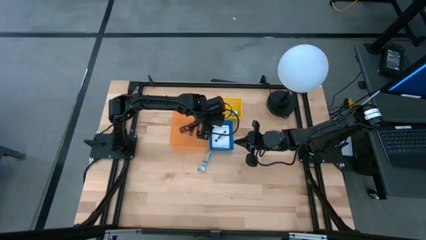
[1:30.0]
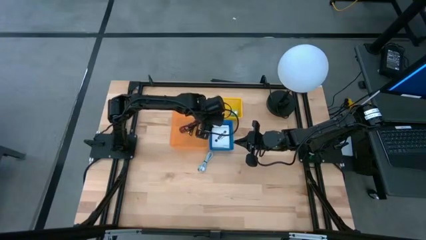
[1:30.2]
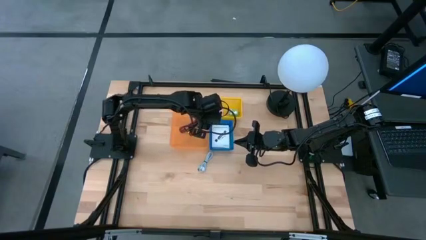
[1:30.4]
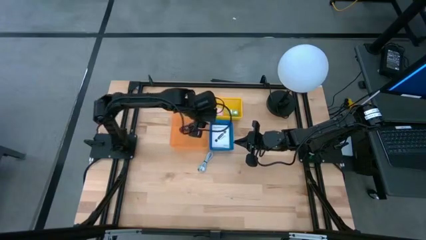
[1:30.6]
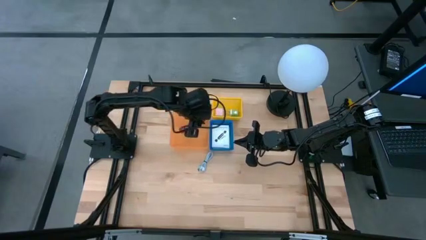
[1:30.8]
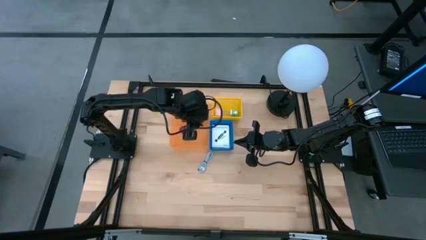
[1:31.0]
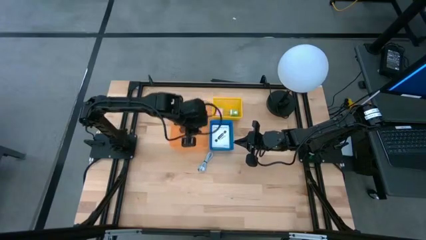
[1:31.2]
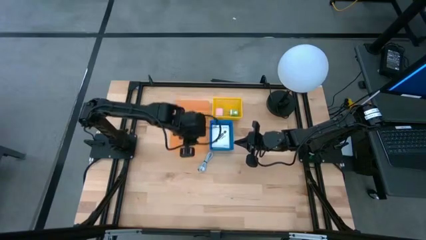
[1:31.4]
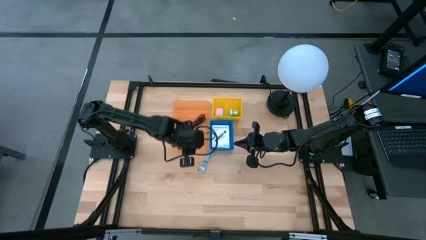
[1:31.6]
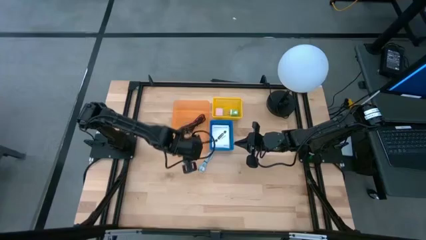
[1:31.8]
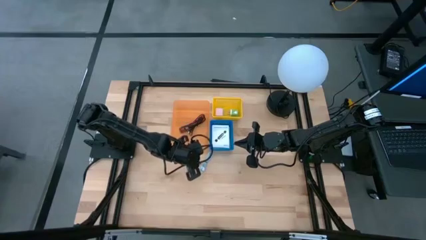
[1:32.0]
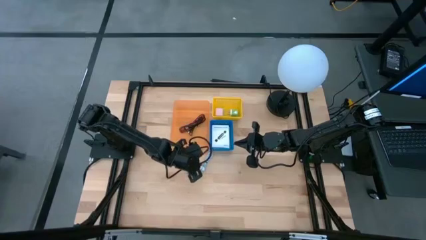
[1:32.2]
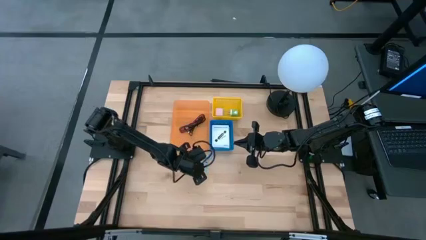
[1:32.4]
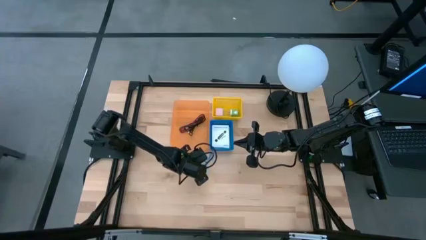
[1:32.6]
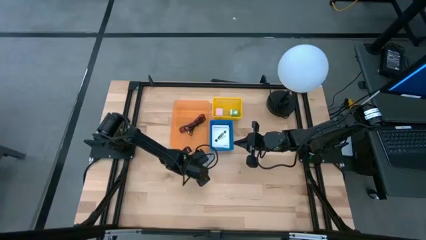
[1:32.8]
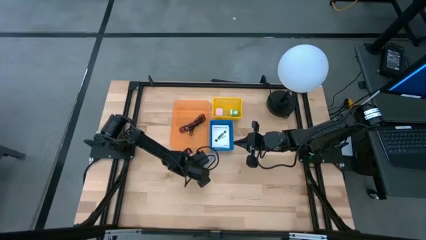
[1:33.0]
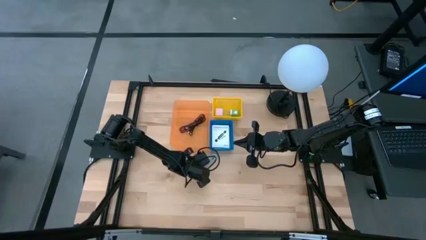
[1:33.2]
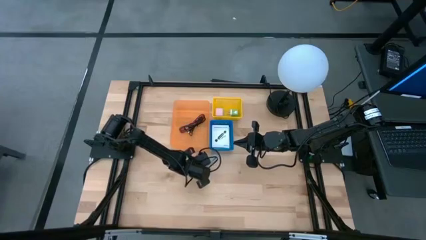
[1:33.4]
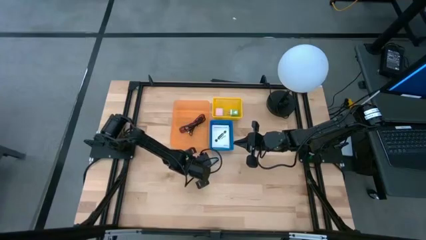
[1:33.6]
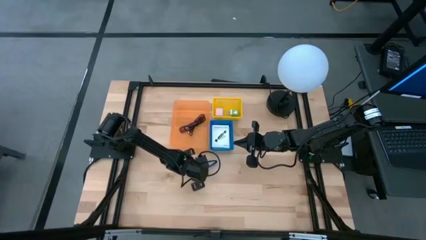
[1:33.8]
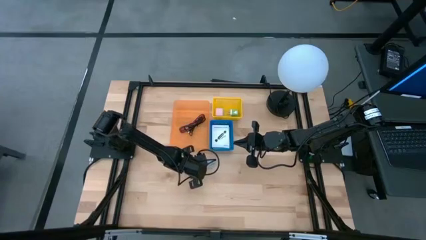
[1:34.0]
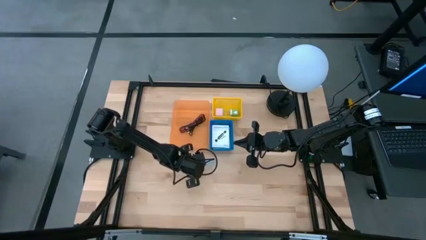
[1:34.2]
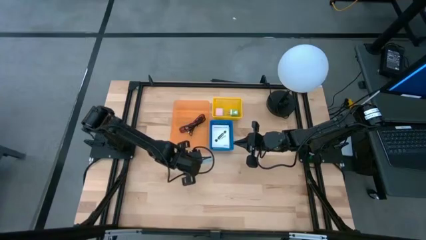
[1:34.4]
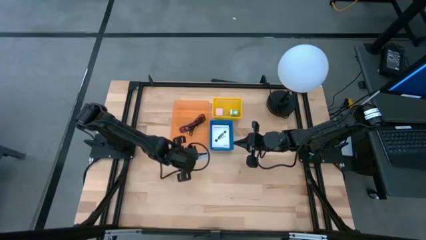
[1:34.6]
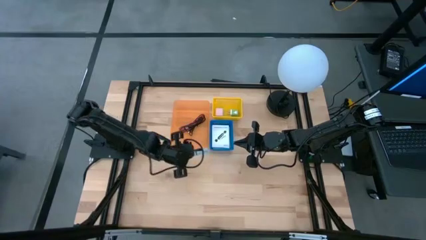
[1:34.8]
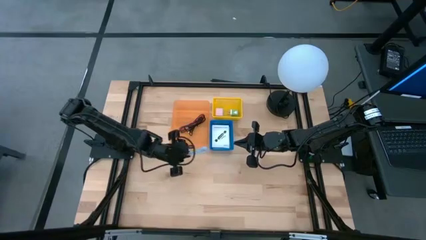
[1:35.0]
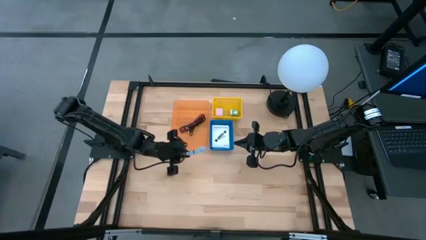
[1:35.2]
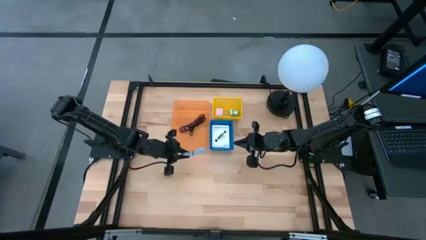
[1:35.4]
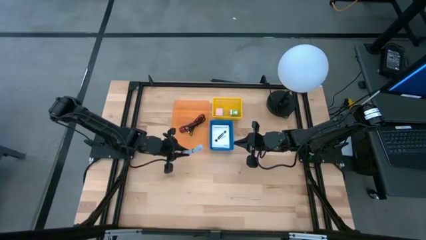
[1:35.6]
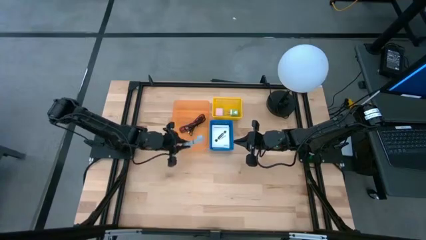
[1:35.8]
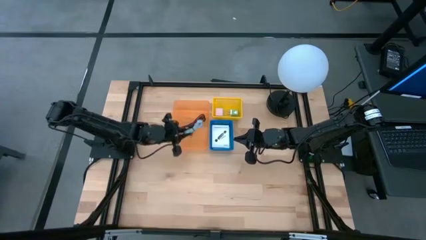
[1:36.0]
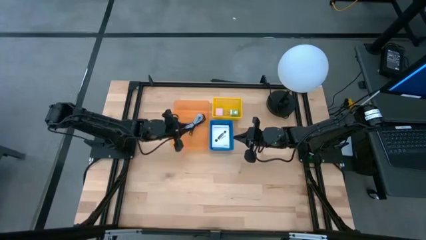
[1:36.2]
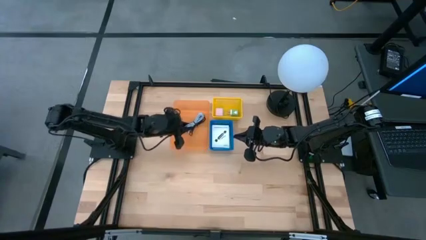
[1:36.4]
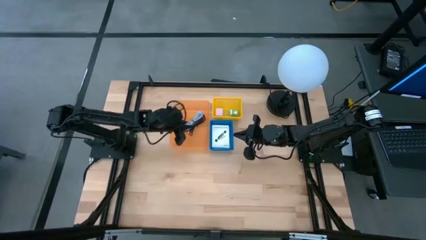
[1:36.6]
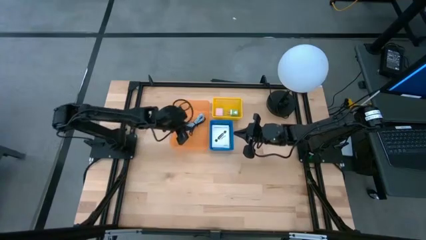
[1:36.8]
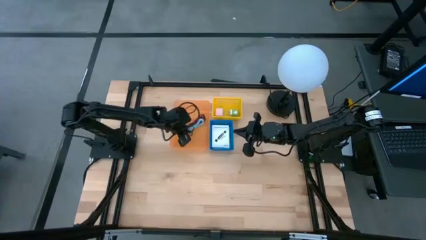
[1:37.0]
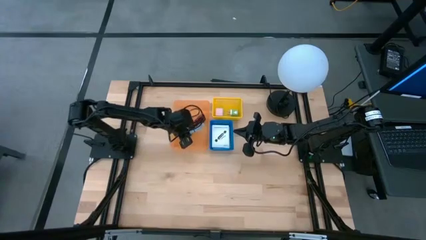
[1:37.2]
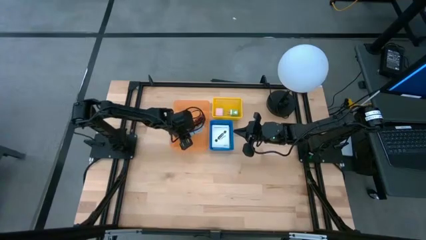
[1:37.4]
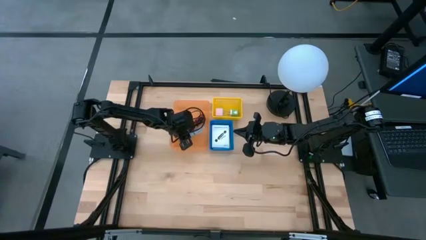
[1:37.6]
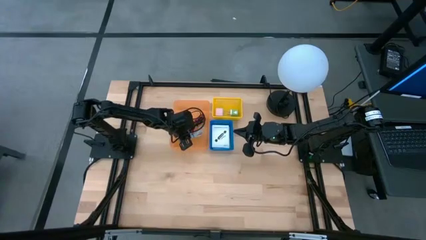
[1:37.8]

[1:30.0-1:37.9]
Task: Pick and place items into bin
Put the white charger cable into the orange bin

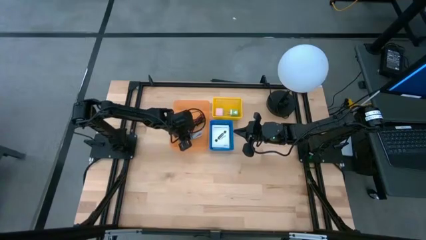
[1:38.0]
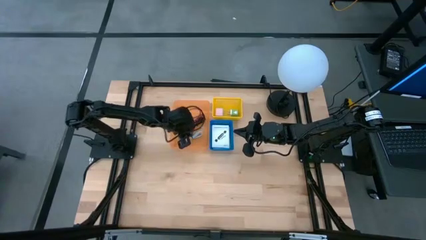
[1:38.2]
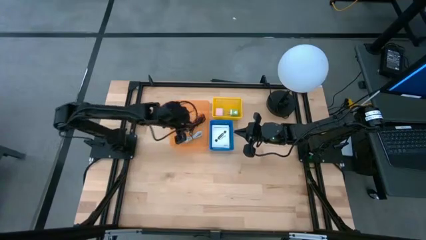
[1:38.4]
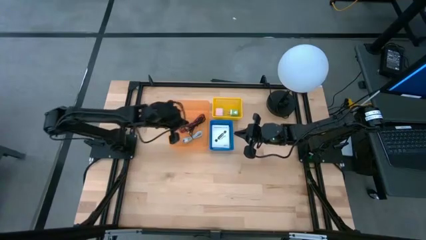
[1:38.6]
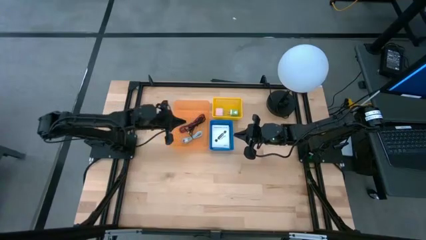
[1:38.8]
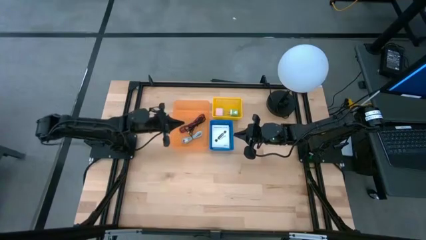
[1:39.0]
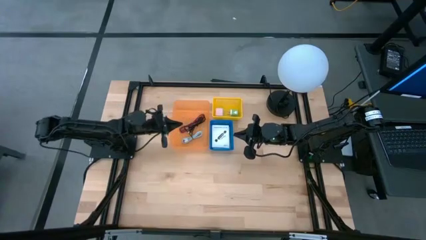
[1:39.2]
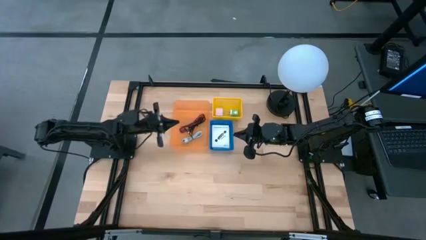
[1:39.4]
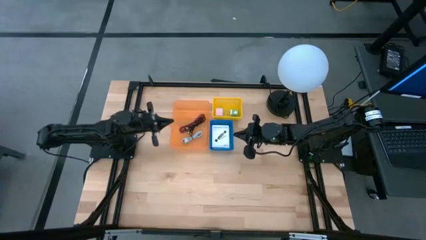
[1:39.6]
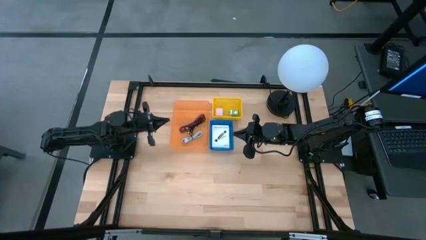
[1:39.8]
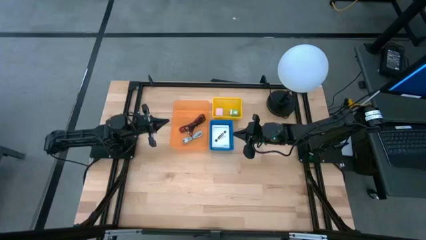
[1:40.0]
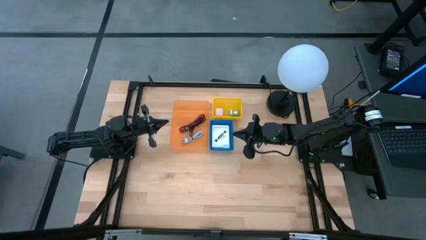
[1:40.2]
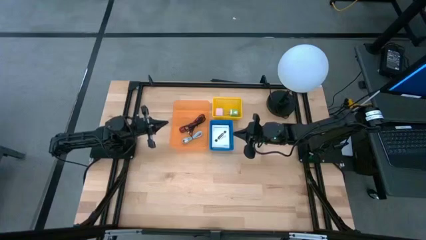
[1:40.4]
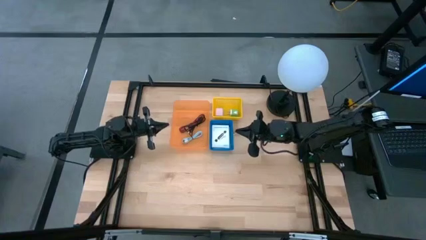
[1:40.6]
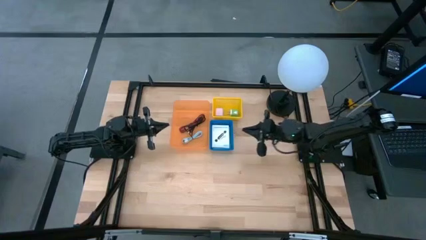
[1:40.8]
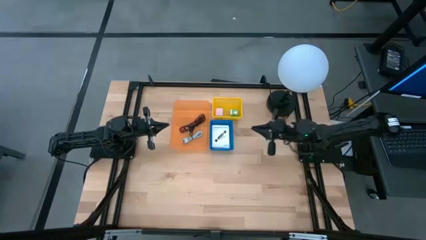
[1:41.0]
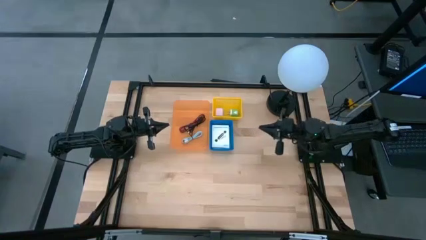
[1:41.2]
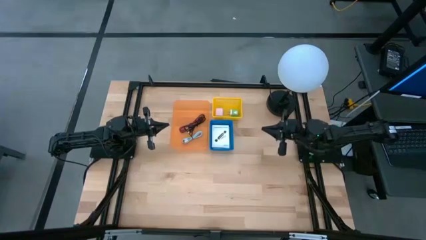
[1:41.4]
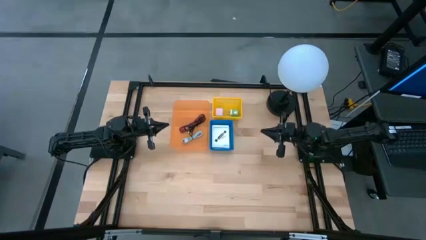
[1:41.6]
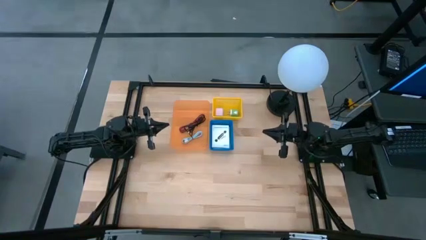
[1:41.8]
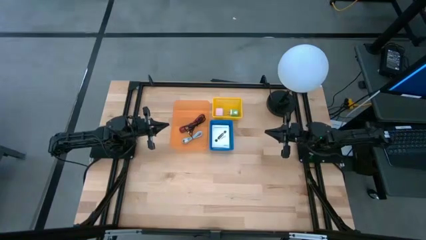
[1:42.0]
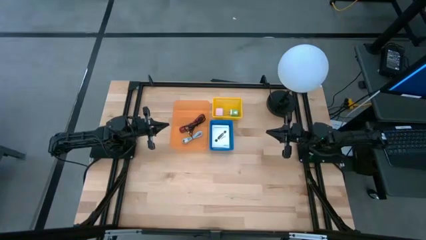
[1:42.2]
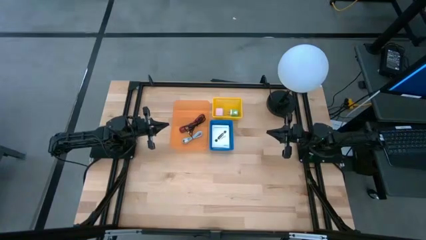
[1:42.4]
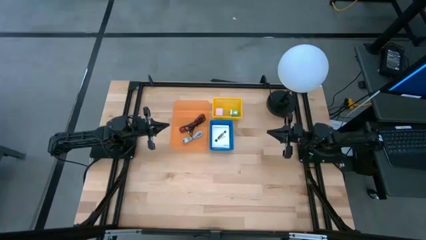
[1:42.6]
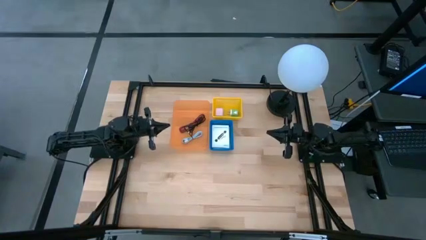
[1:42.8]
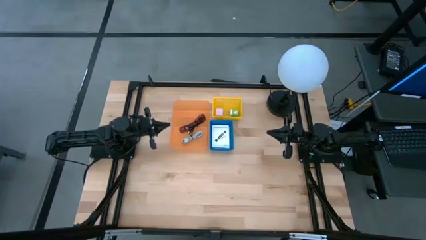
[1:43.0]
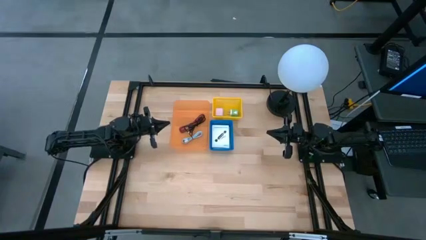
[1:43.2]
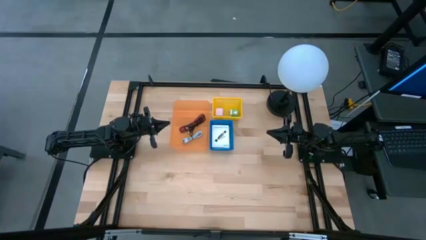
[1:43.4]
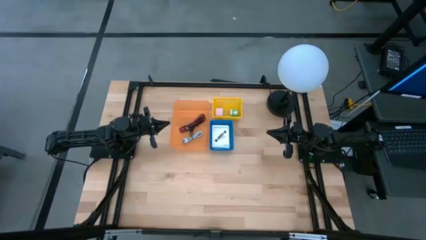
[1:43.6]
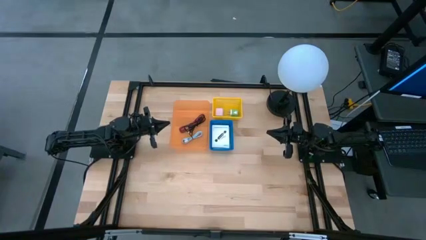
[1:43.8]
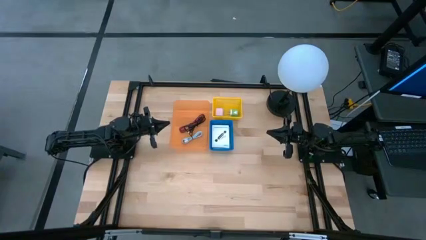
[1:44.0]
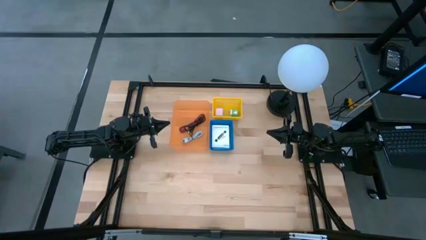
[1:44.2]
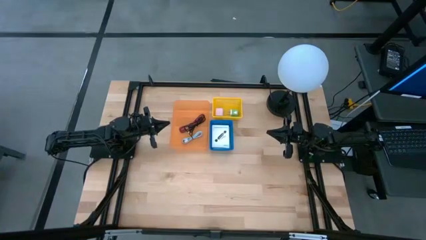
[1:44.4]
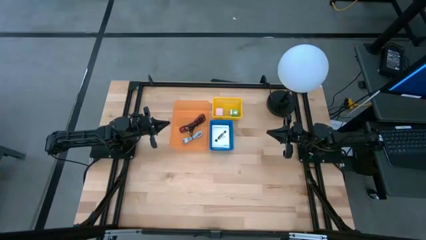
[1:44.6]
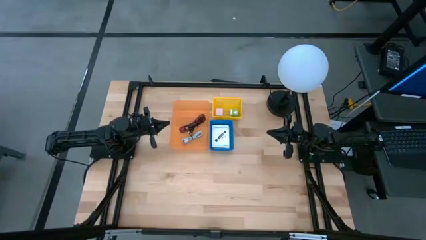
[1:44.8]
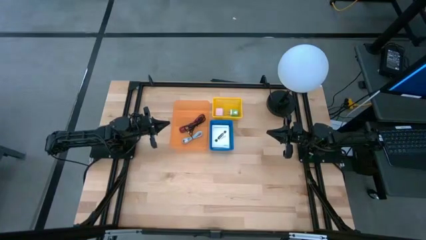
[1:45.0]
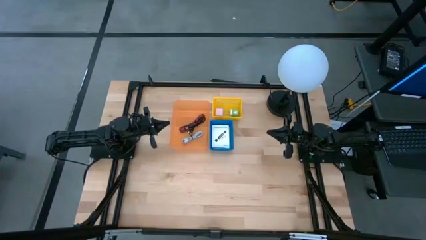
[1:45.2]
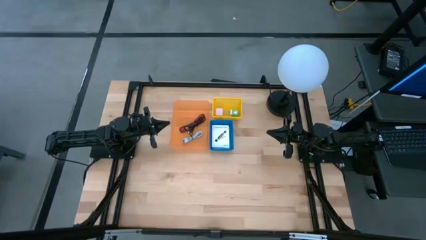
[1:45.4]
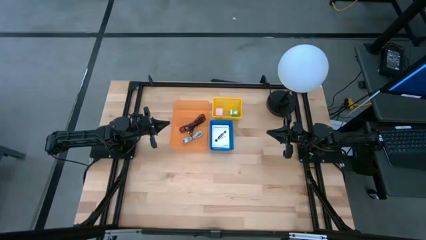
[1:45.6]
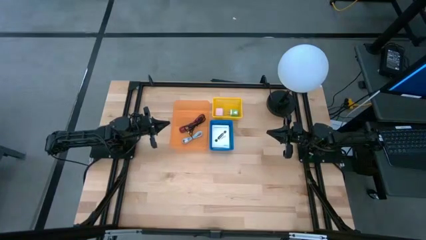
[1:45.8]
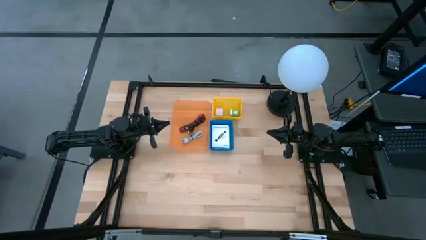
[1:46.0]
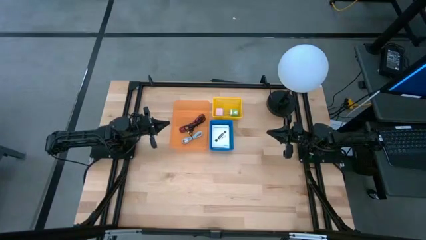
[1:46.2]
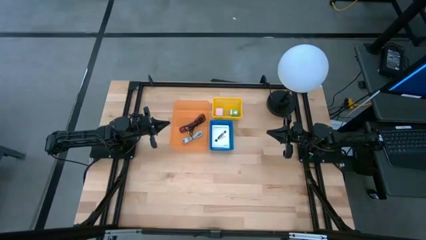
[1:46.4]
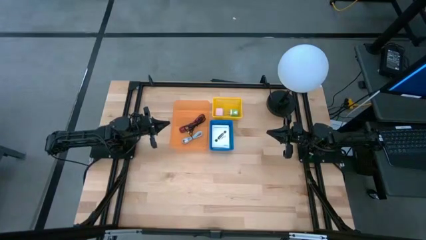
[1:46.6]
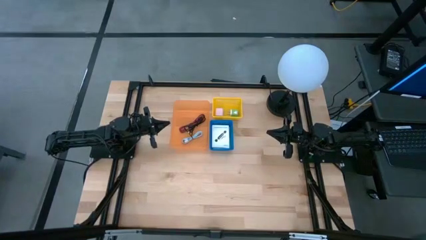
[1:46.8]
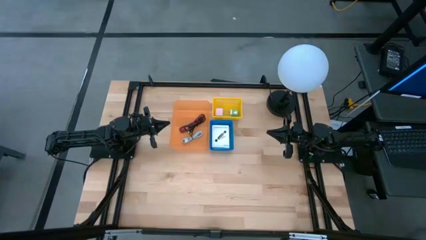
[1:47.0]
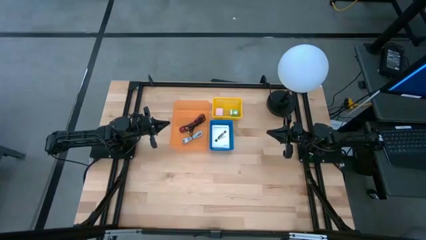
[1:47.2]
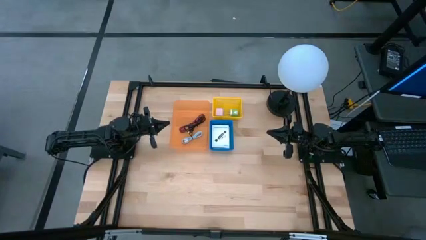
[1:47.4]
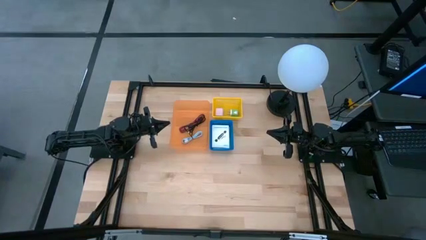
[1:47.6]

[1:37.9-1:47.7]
Return to Home Position
